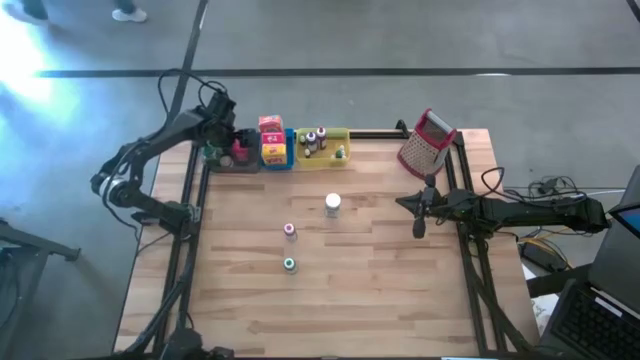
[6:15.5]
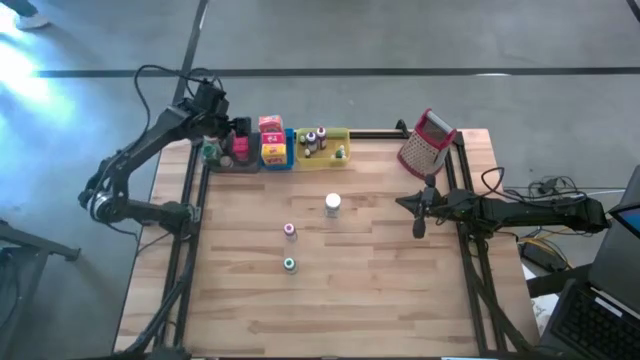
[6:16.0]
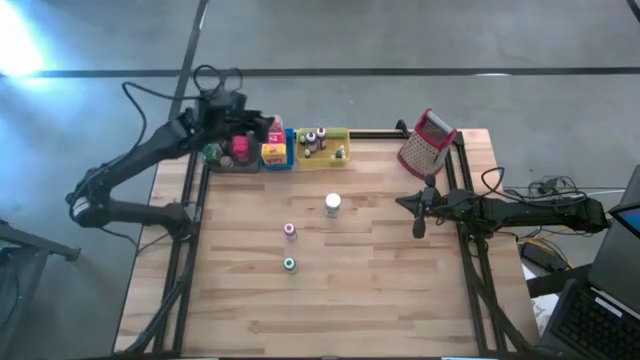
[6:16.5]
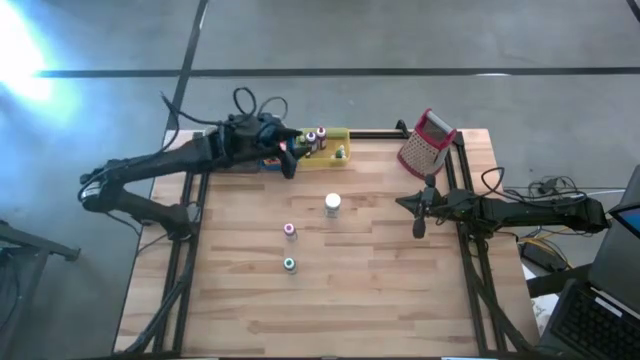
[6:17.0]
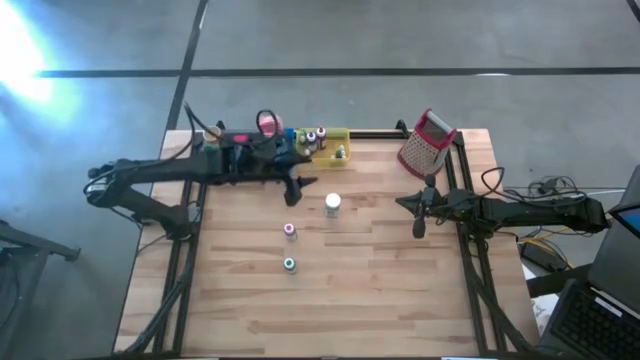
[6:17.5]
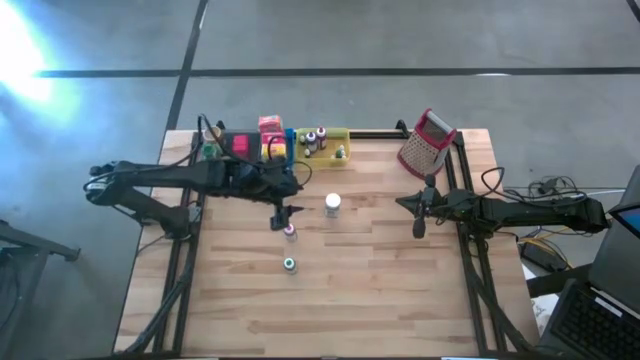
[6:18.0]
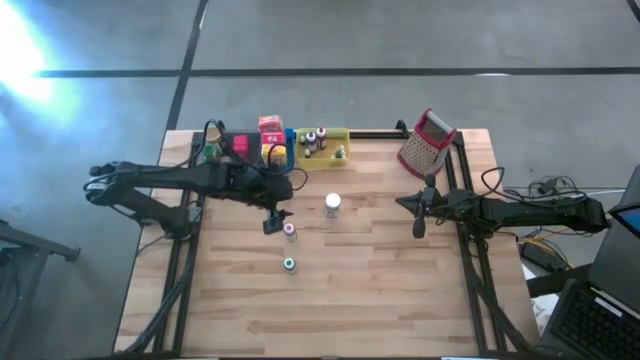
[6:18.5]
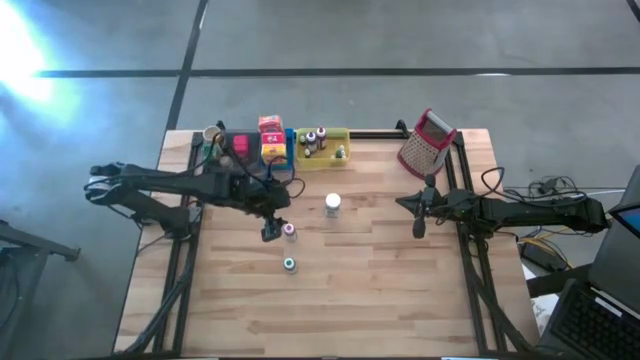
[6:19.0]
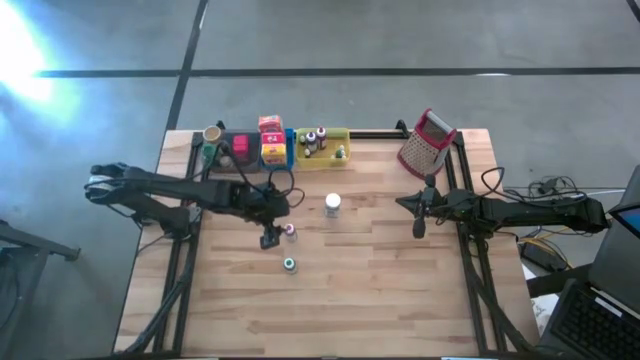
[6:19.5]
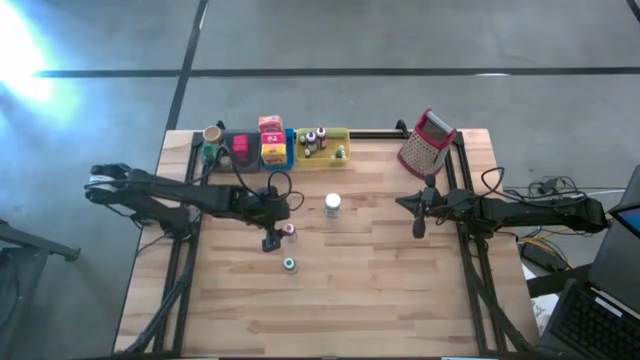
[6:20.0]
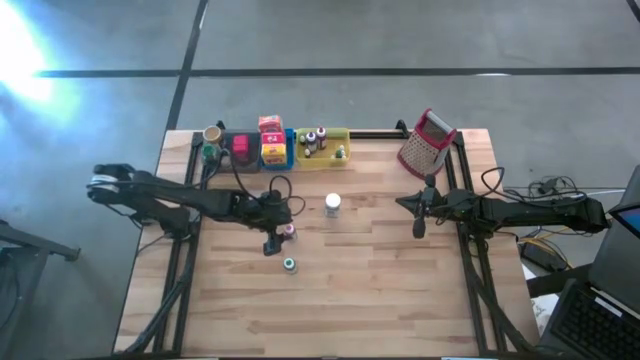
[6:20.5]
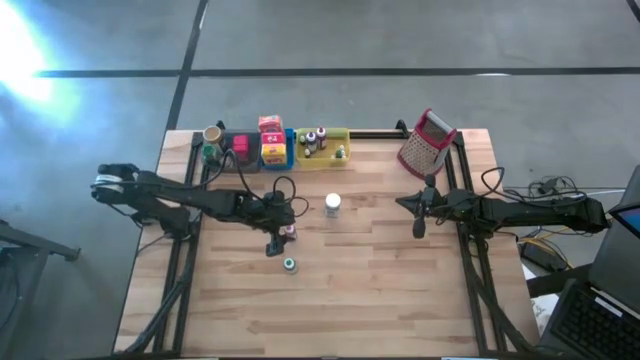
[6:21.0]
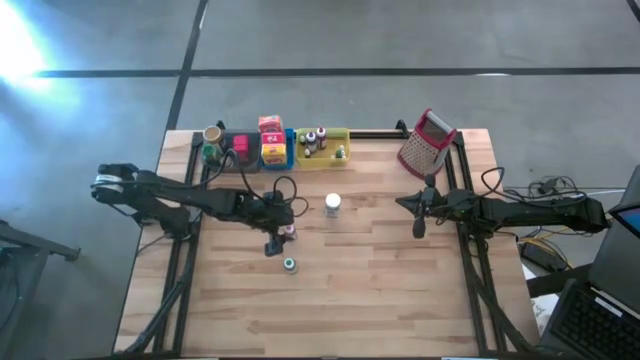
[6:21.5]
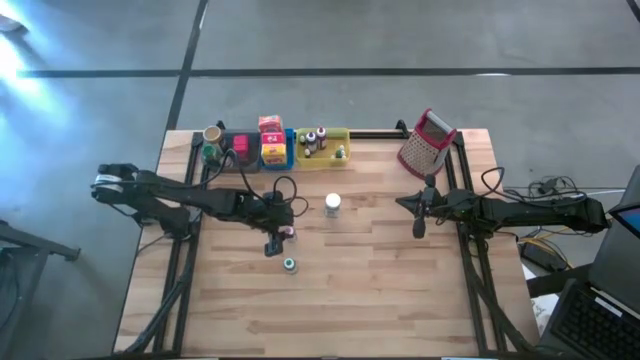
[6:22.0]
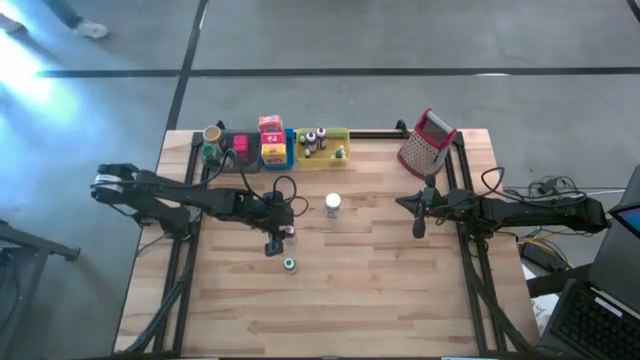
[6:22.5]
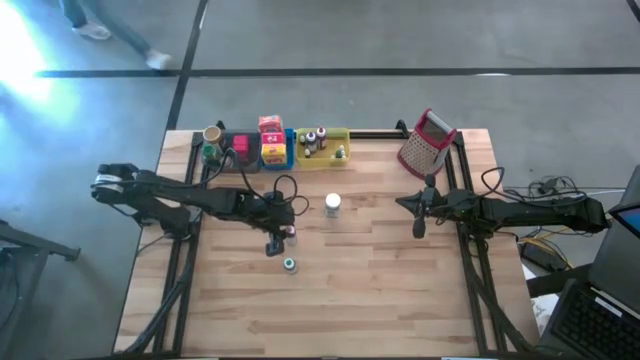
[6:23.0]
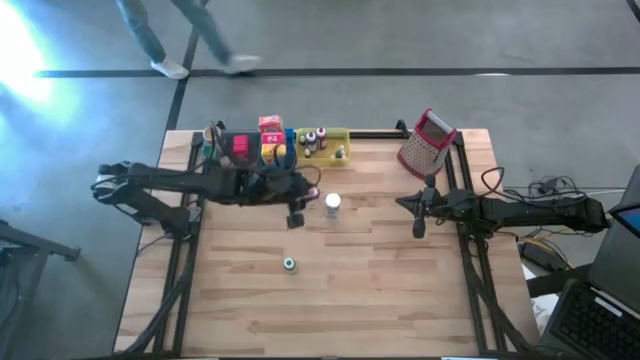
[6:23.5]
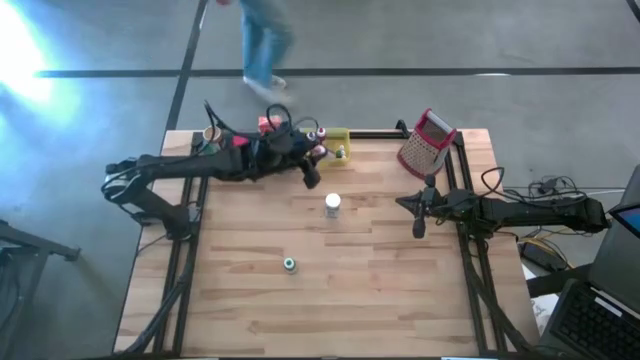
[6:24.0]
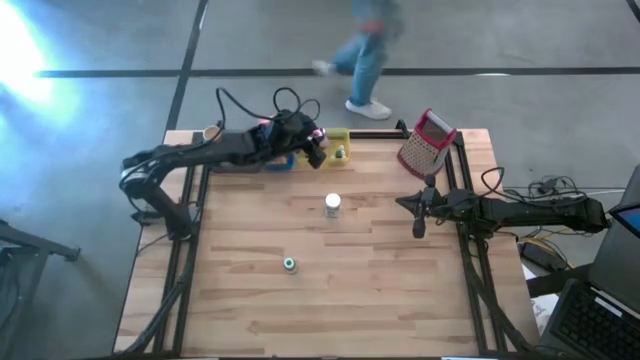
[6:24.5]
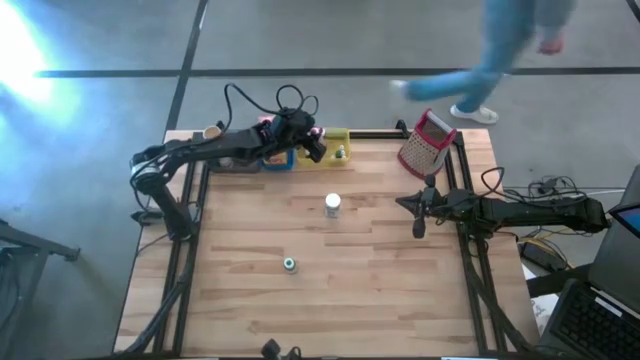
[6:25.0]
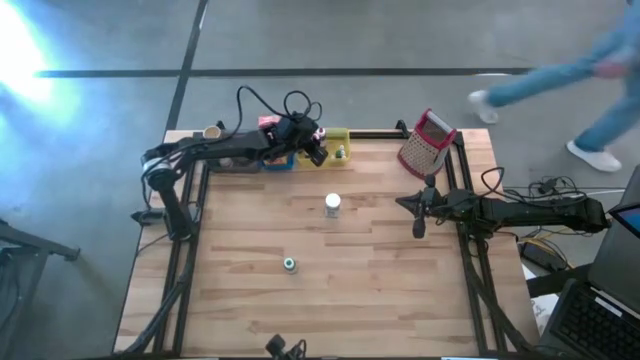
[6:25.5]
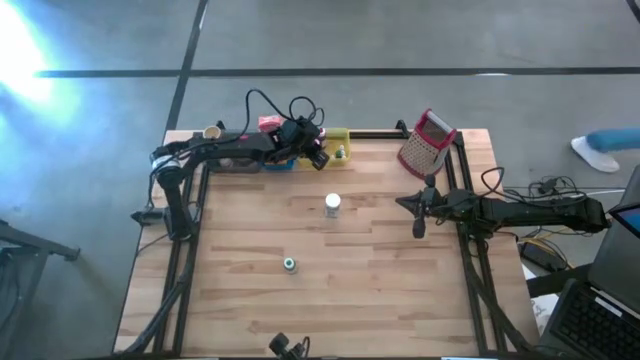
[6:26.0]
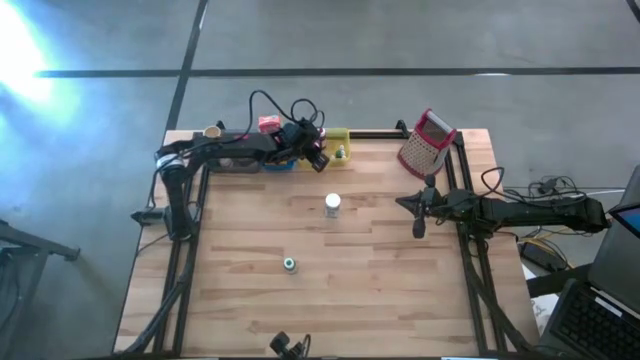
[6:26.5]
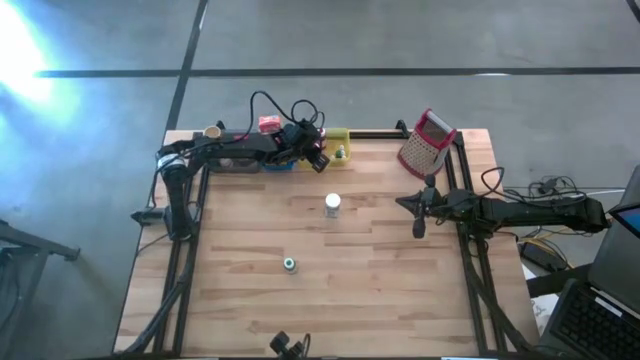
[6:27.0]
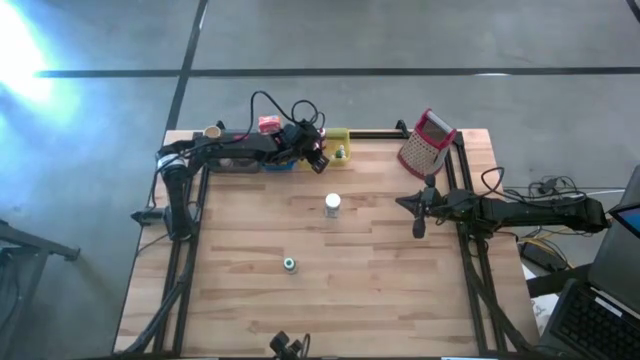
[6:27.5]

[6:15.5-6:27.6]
Task: Pick & Place Kitchen Items
Put the pink food coloring bottle into the yellow bin

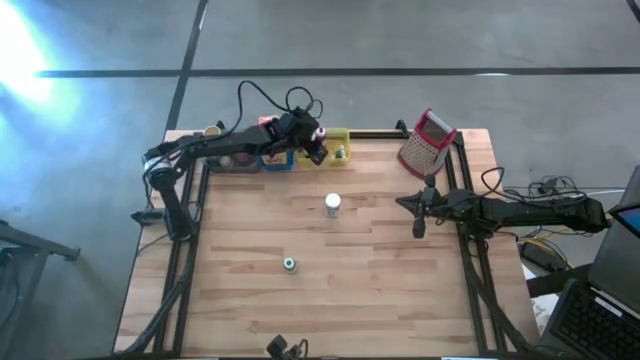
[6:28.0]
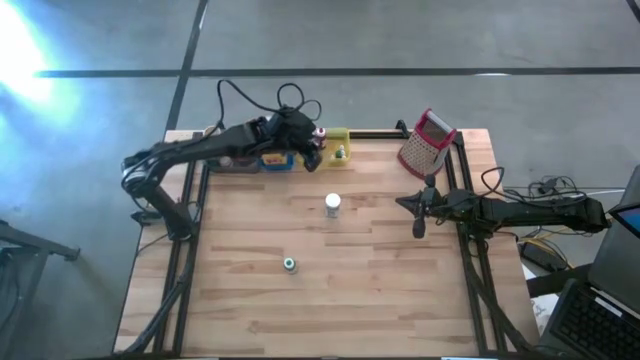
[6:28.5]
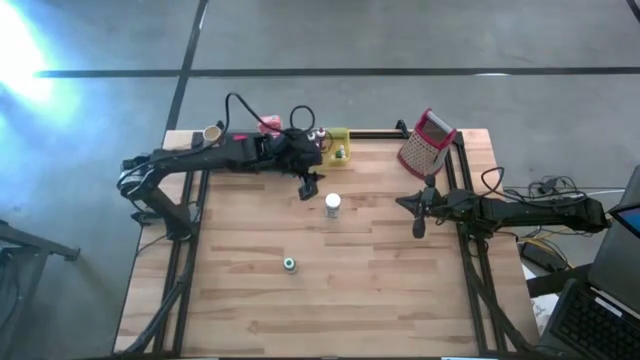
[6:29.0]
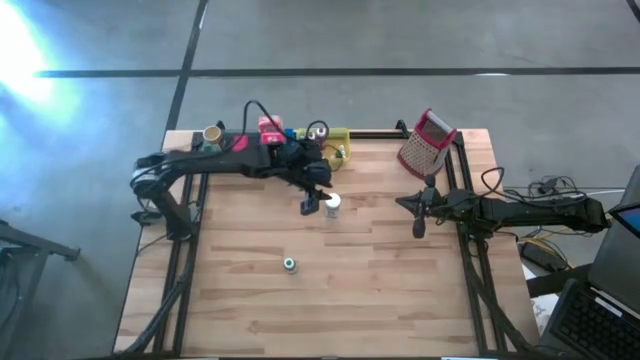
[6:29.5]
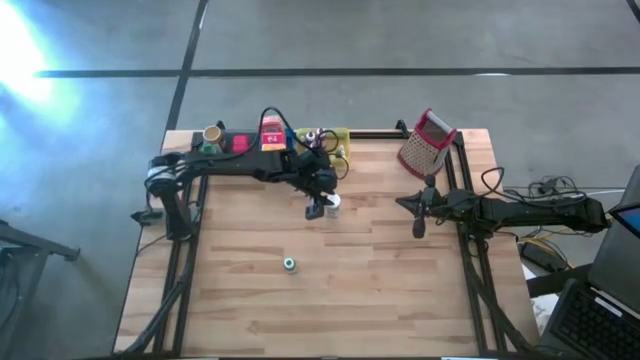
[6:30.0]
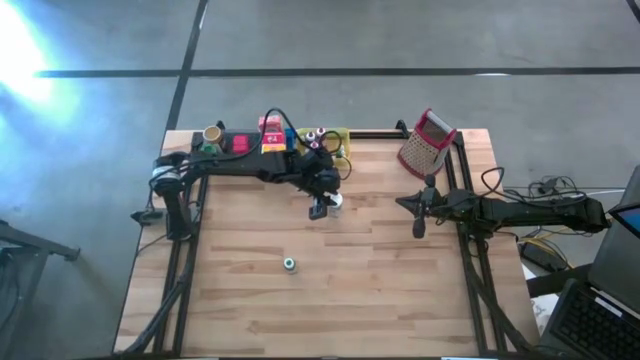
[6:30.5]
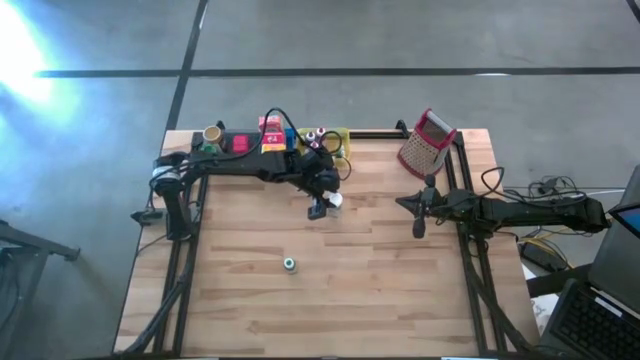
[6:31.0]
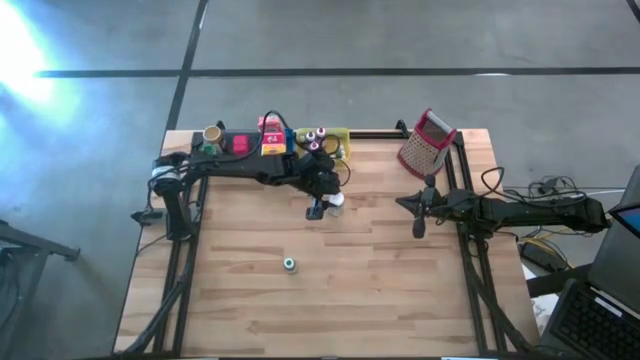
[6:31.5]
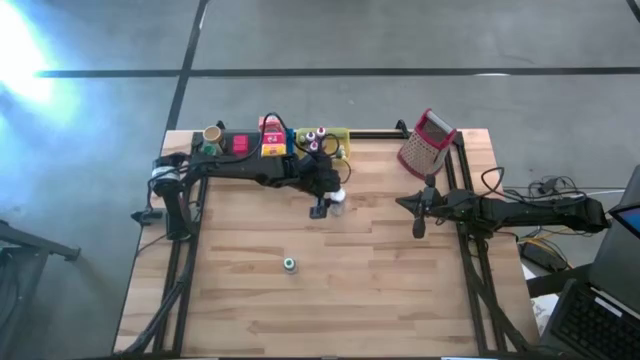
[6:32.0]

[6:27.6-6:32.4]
Put the white seasoning bottle into the blue bin

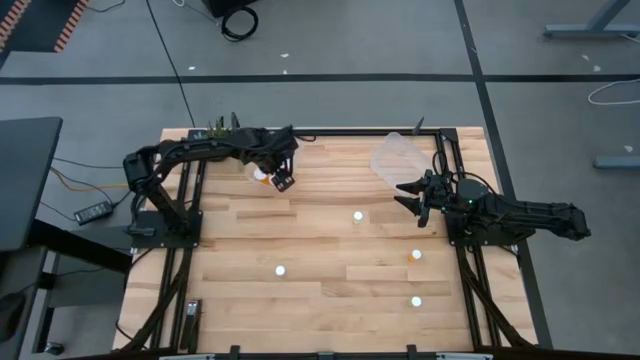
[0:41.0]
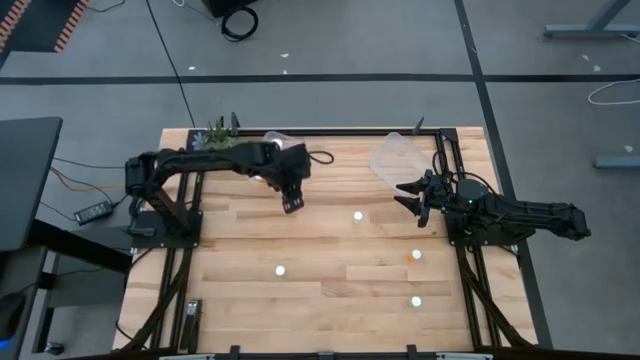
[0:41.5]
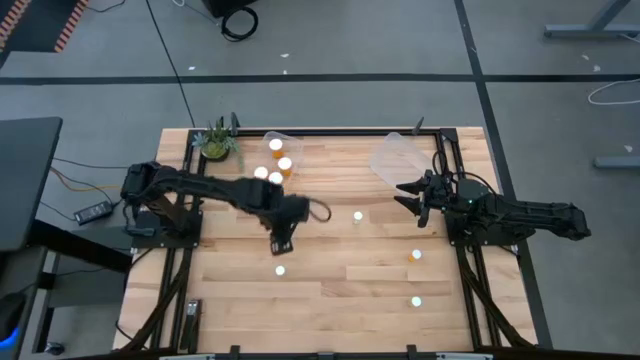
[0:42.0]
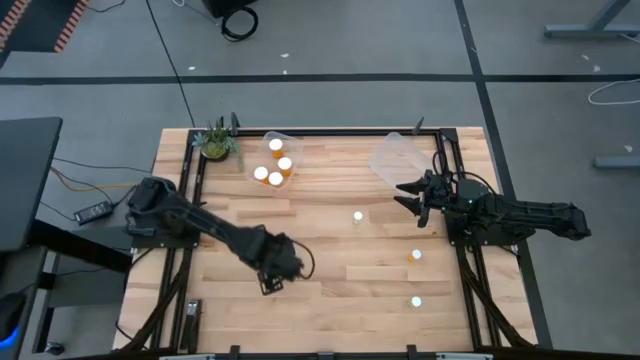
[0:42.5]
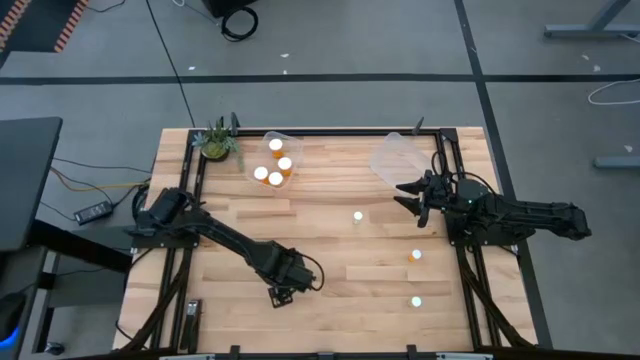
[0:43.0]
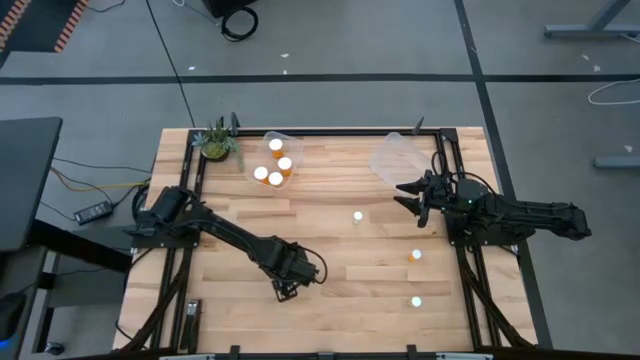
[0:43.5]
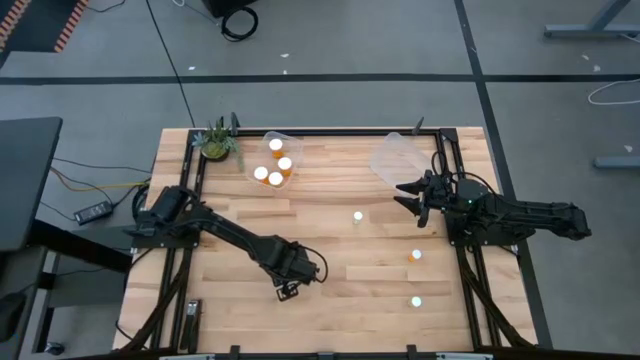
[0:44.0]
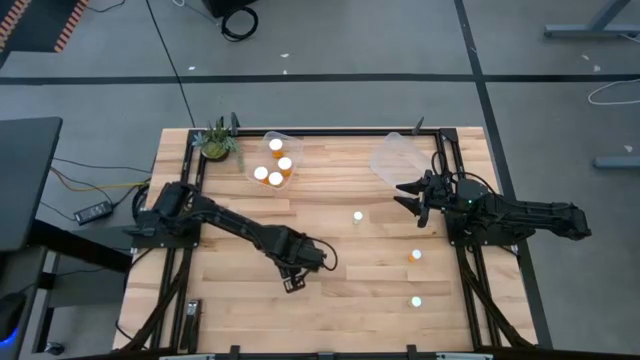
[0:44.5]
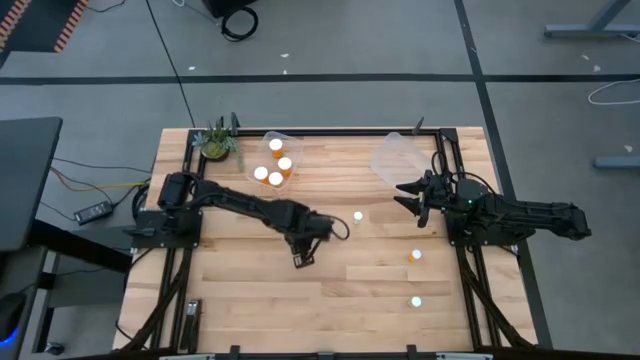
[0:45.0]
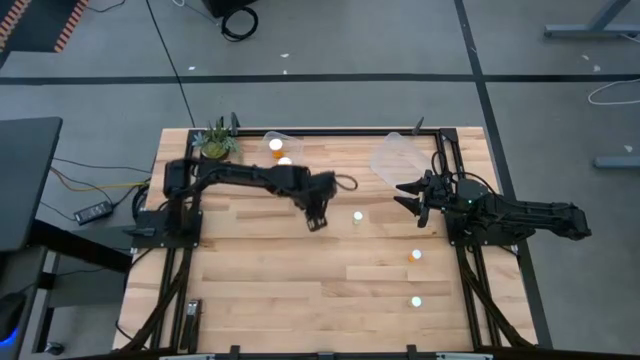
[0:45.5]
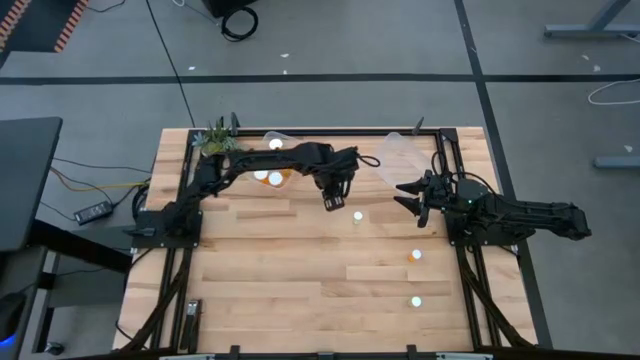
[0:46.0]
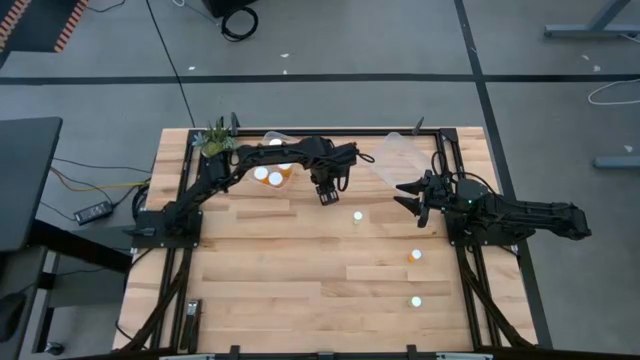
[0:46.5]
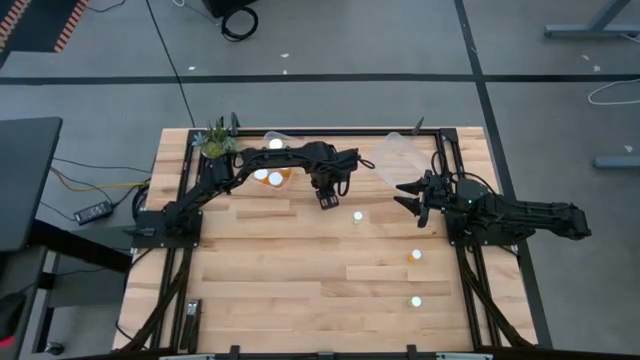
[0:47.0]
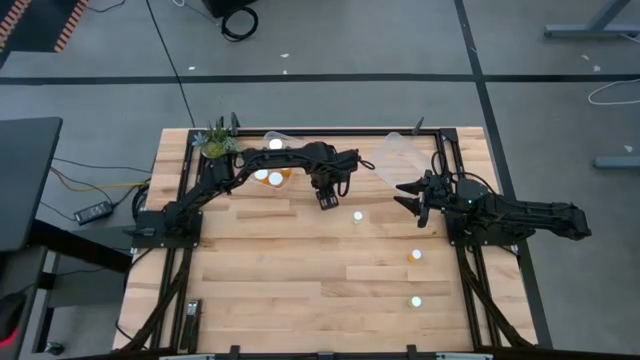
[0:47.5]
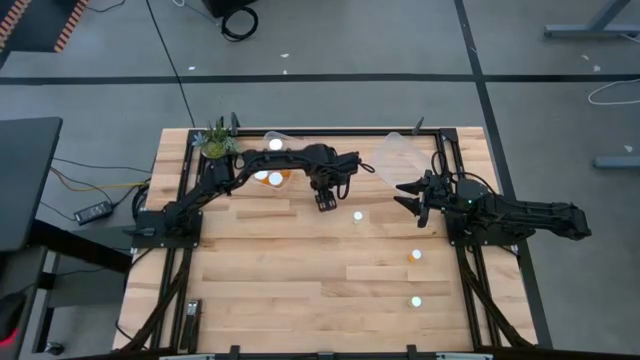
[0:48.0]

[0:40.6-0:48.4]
Task: Pick and place medicine bottles into bin by pill shape (circle, oval)
Move the small yellow pill bottle to the top middle of the table
